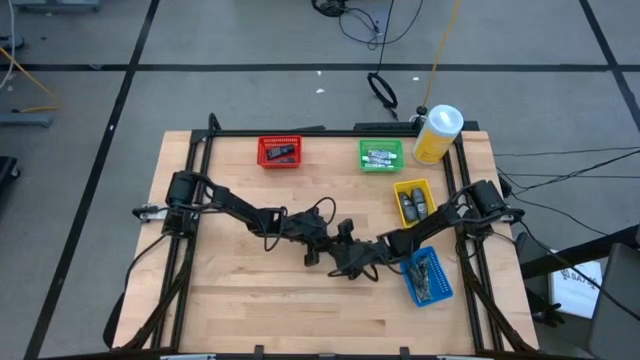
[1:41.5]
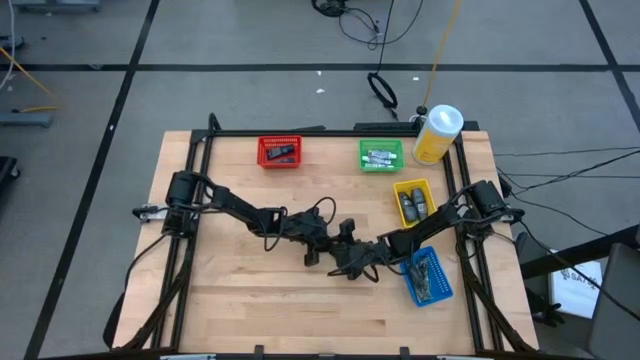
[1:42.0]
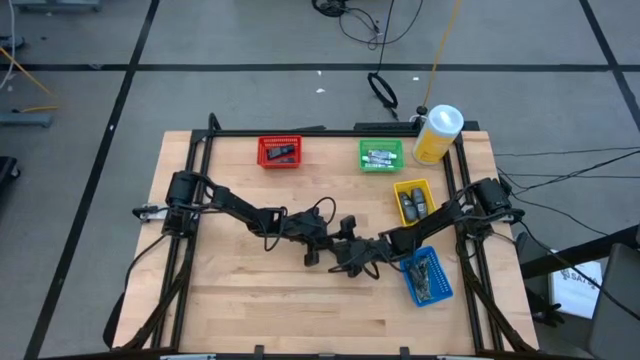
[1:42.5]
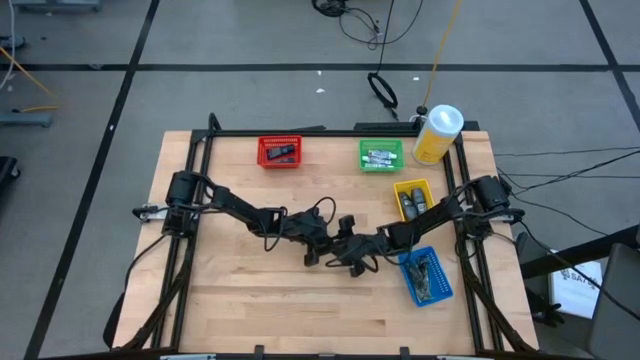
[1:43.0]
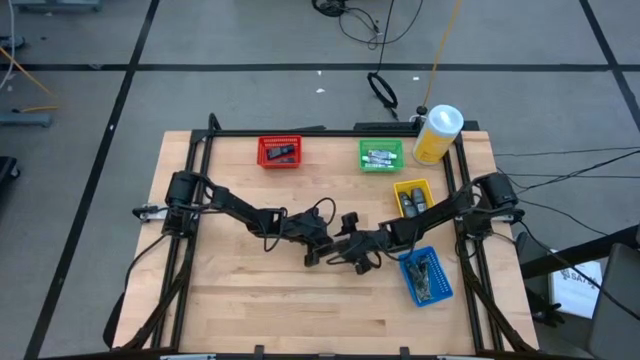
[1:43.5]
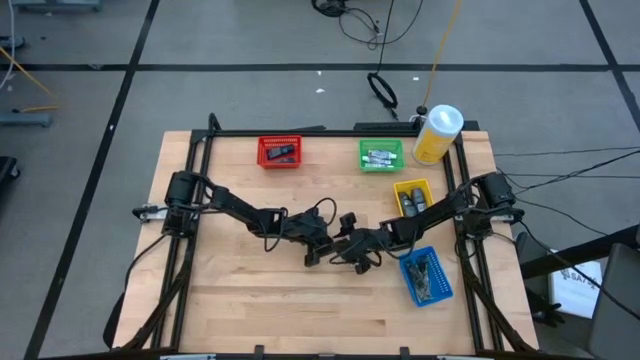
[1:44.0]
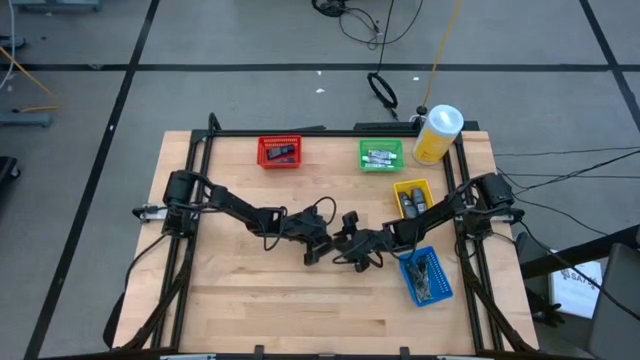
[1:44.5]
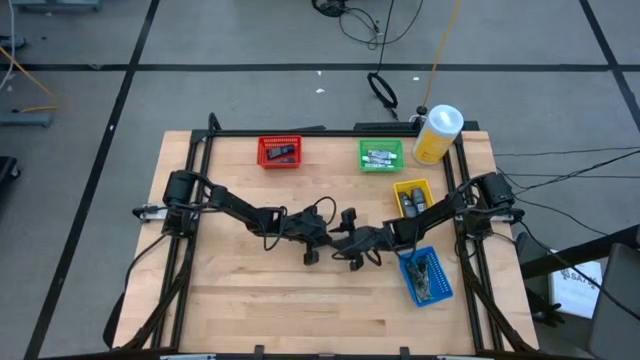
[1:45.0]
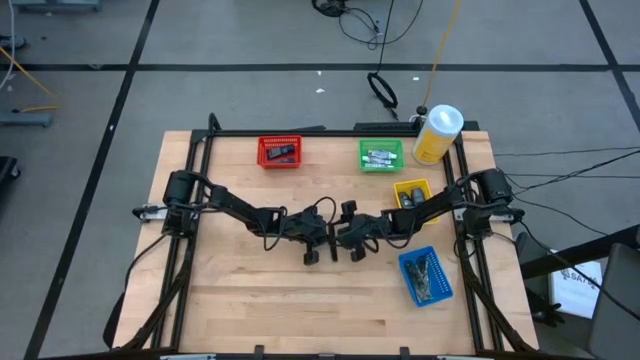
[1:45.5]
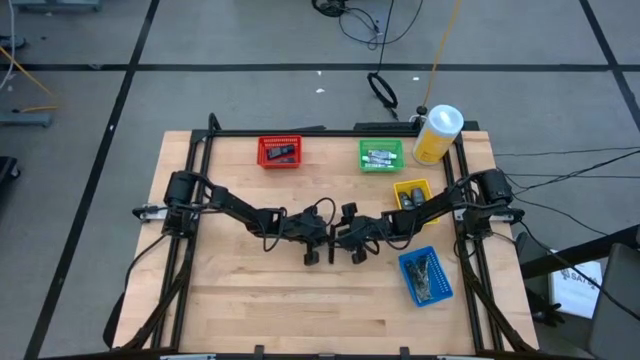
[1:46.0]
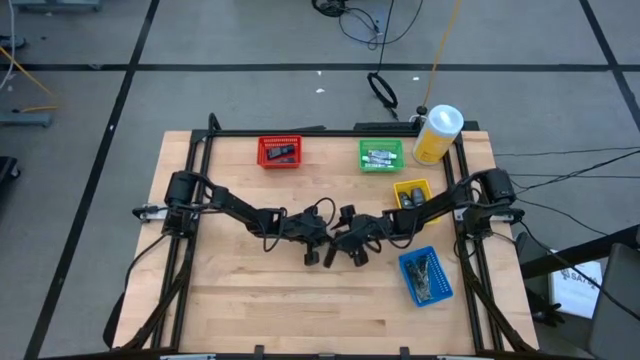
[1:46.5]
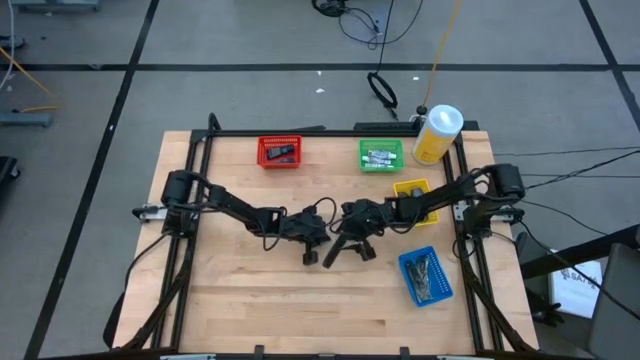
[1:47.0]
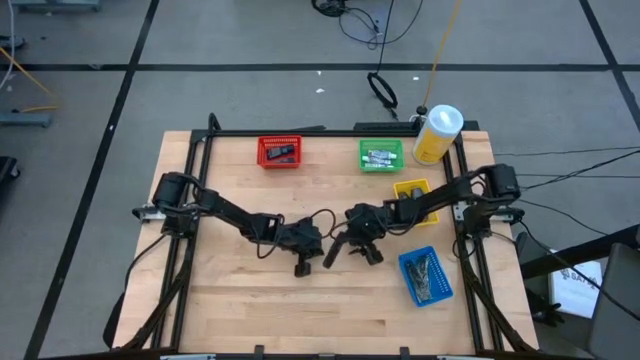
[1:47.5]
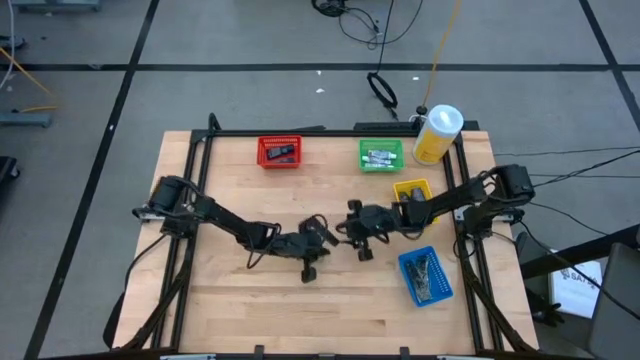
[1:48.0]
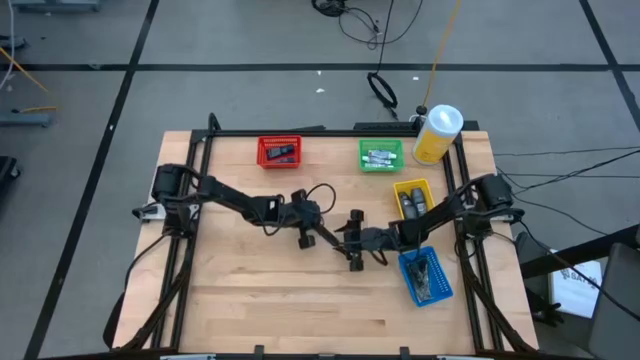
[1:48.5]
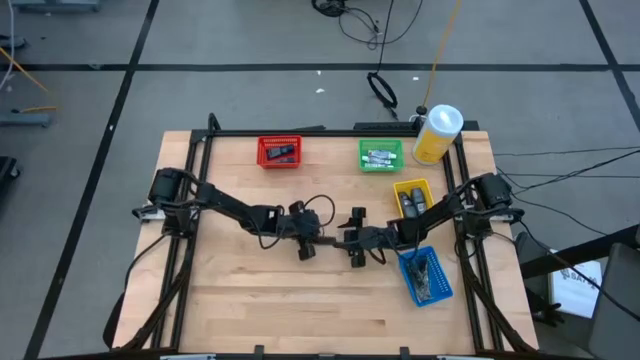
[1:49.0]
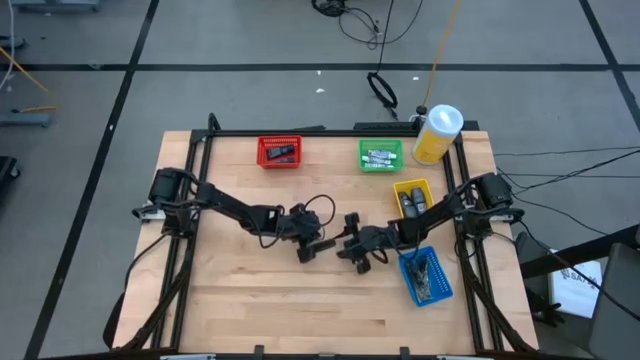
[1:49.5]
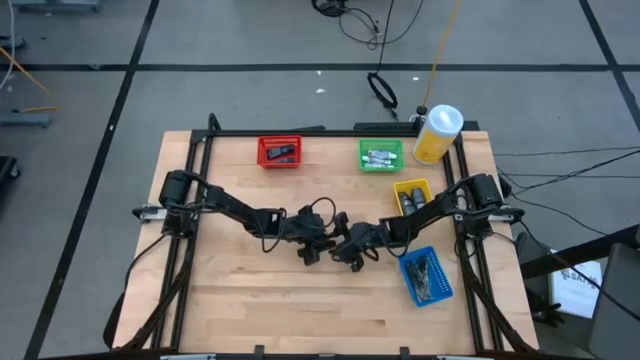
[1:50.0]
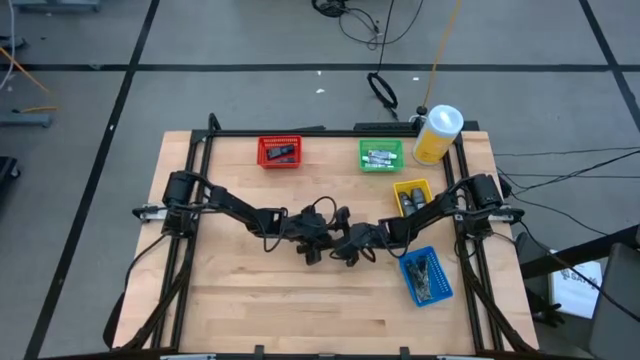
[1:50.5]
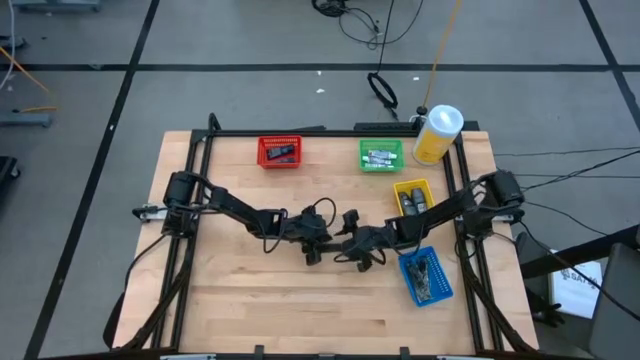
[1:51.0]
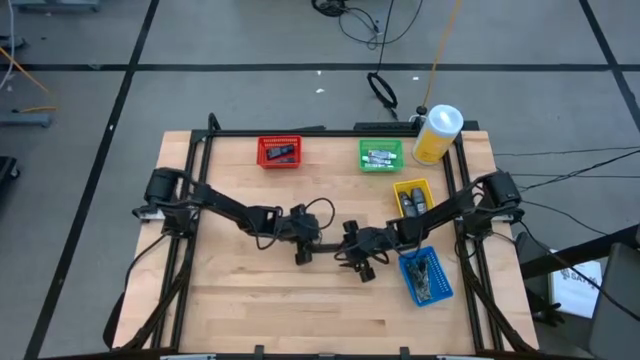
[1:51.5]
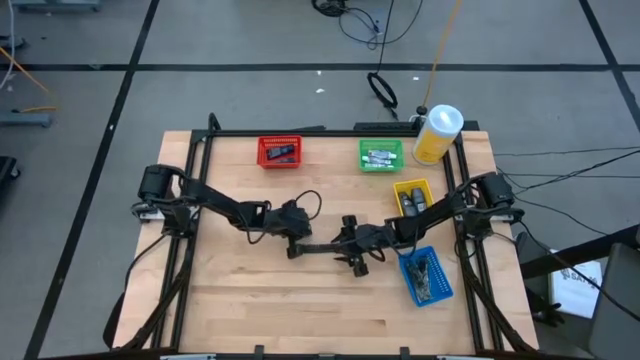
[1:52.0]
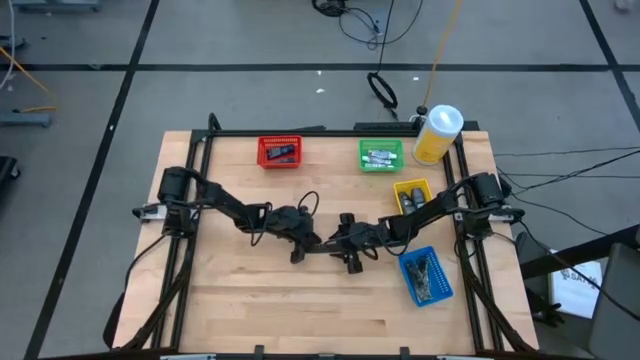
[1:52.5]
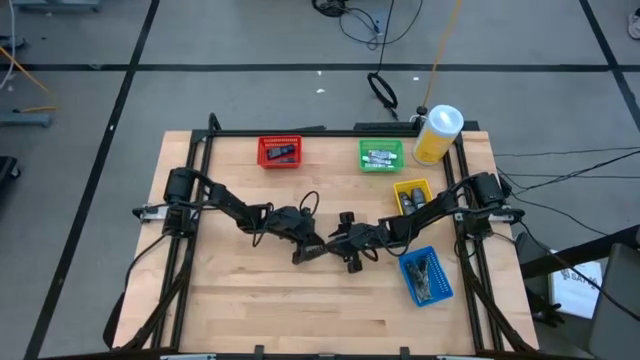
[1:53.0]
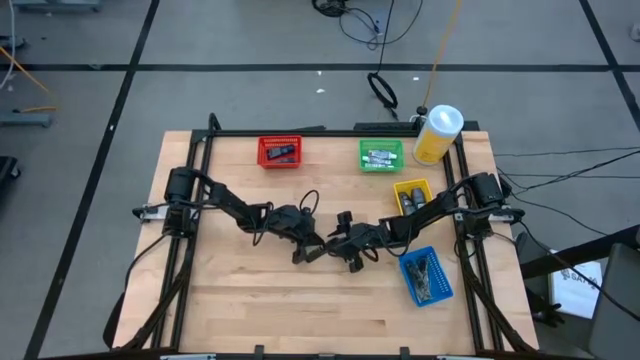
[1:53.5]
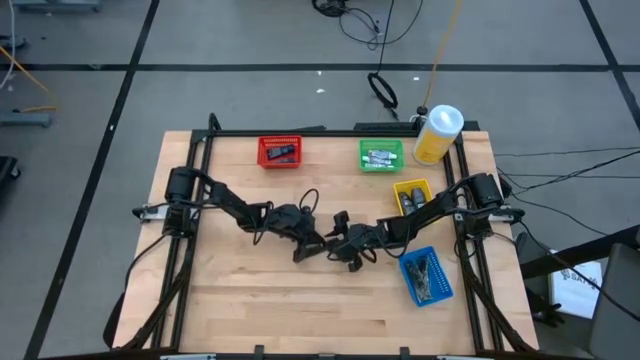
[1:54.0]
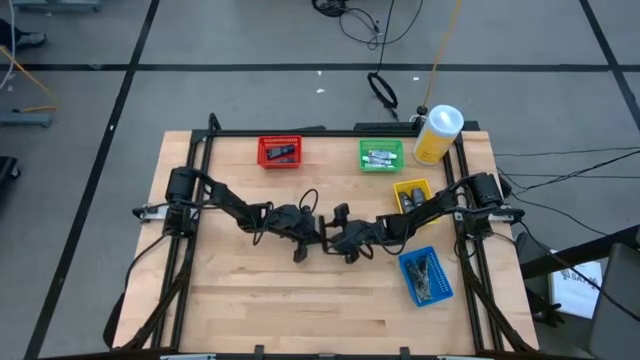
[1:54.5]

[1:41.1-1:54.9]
Task: Pick & Place Travel size toiletries
Put the black comb into the blue bin

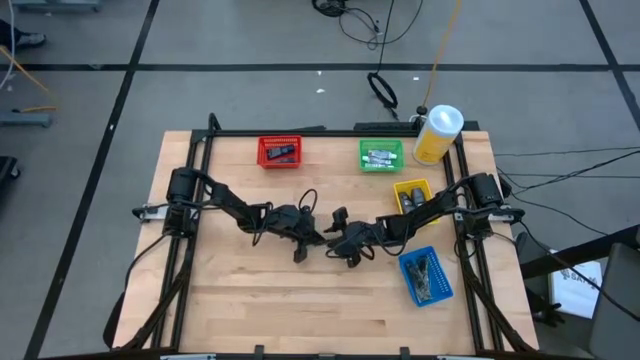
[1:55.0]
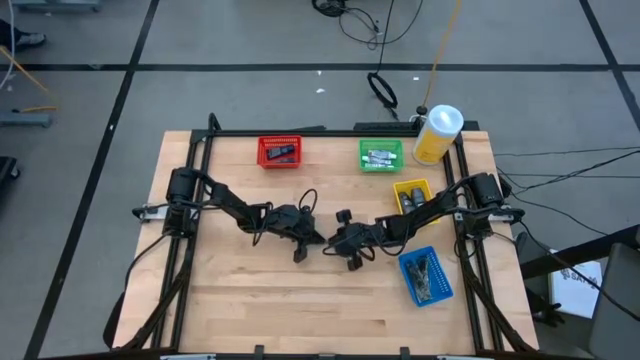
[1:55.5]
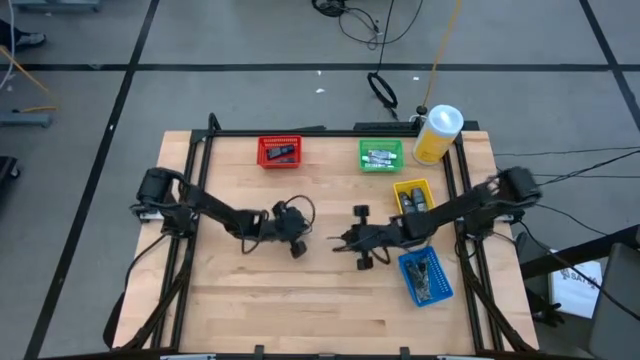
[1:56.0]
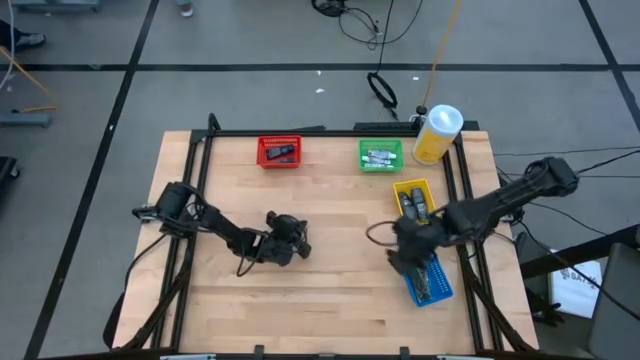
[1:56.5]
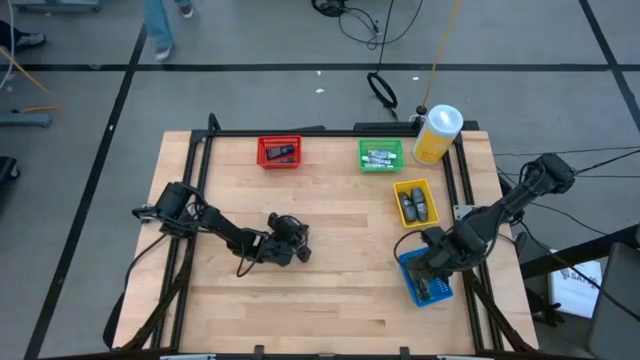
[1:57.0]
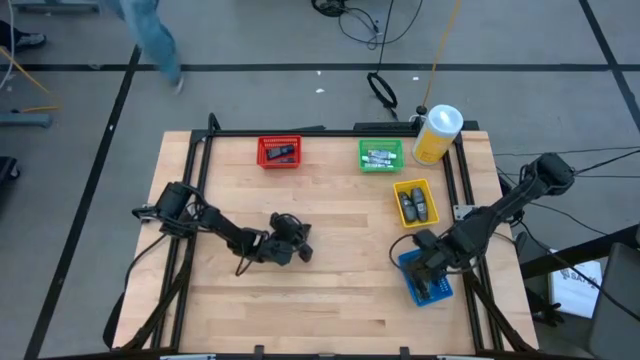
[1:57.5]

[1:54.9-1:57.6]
Put the black comb into the blue bin

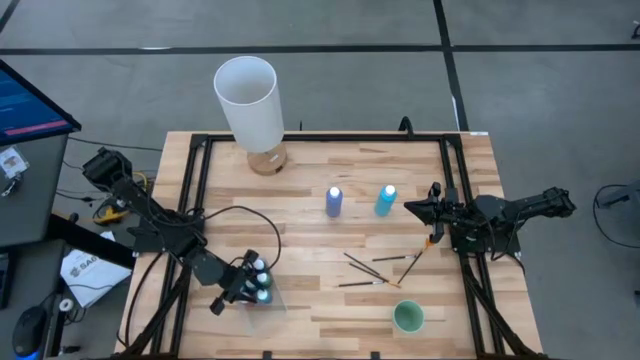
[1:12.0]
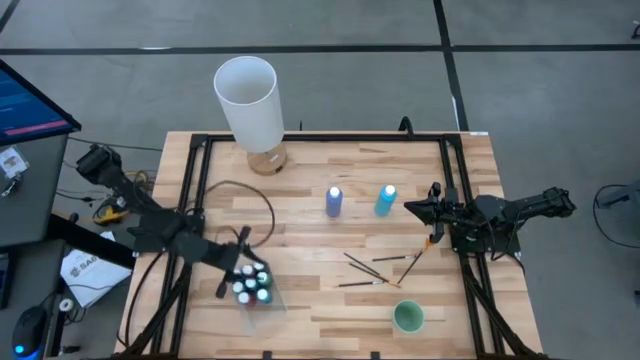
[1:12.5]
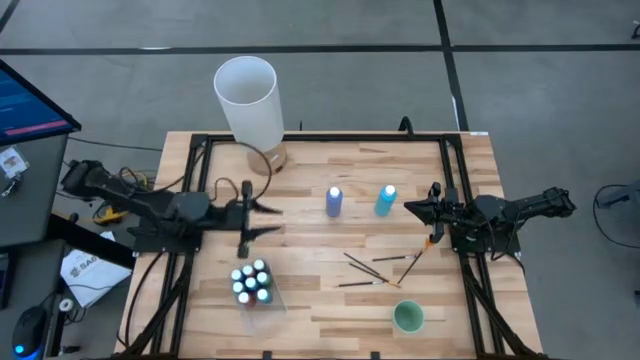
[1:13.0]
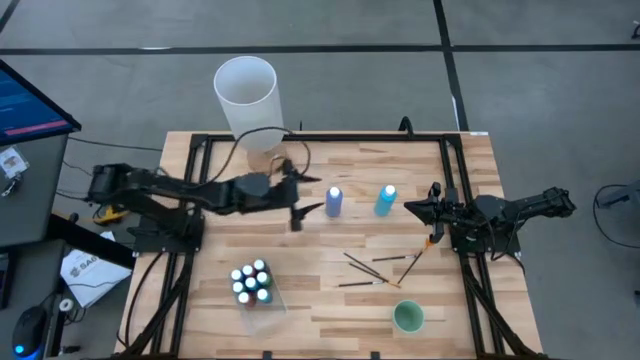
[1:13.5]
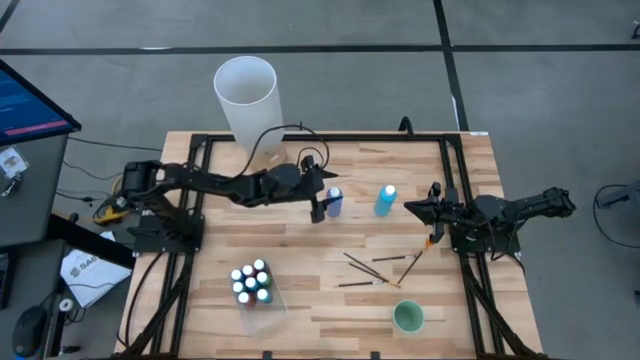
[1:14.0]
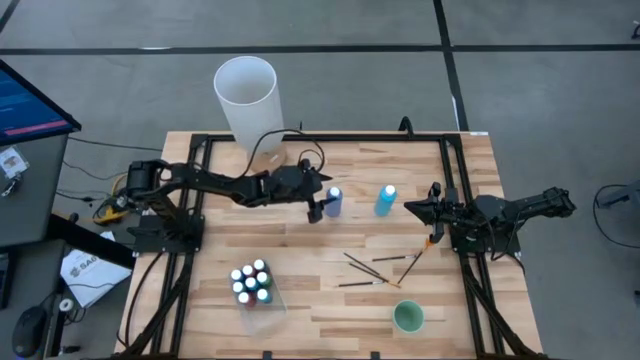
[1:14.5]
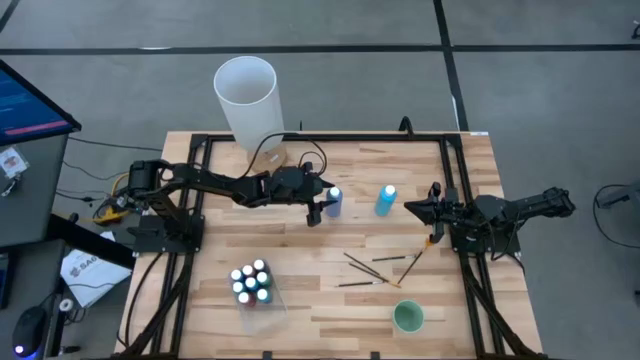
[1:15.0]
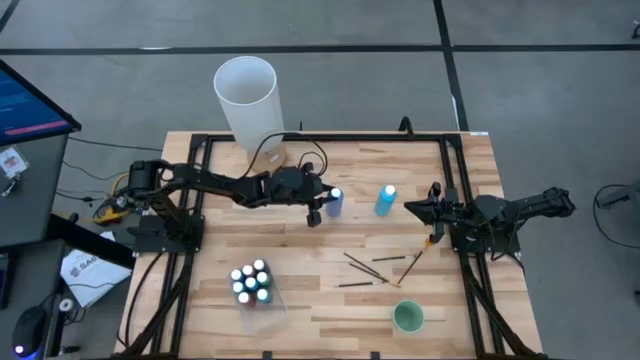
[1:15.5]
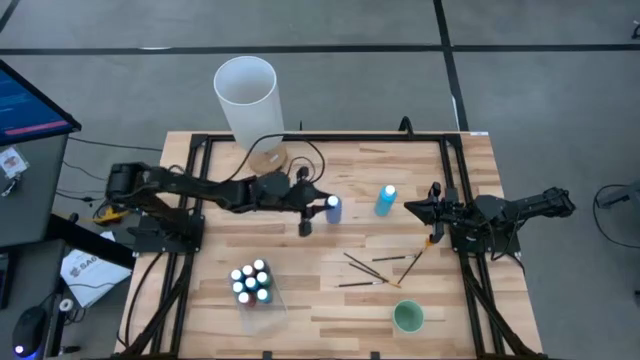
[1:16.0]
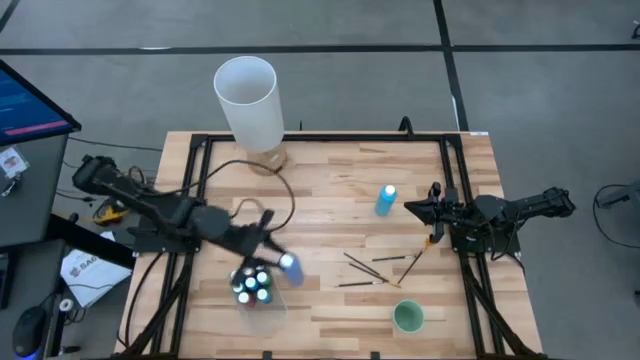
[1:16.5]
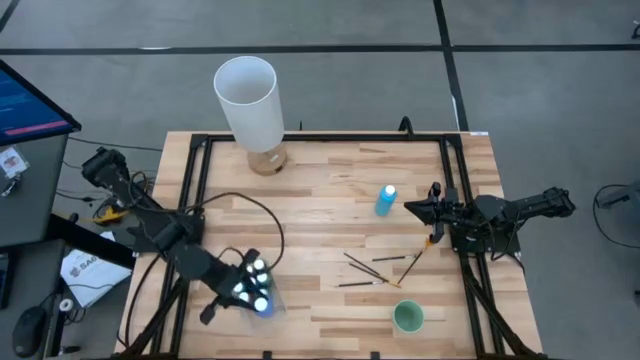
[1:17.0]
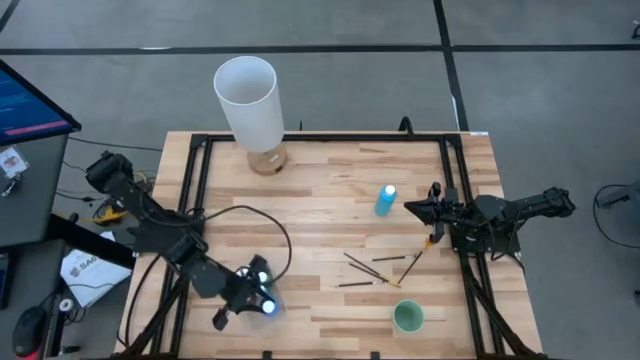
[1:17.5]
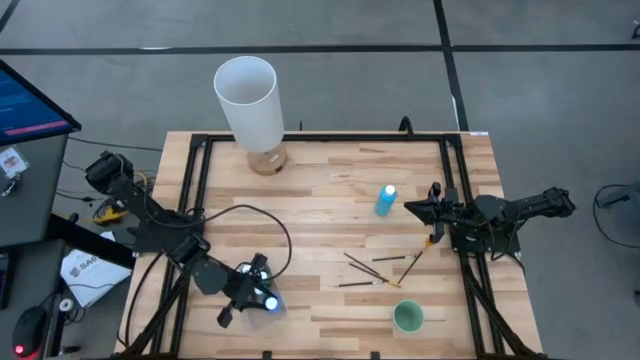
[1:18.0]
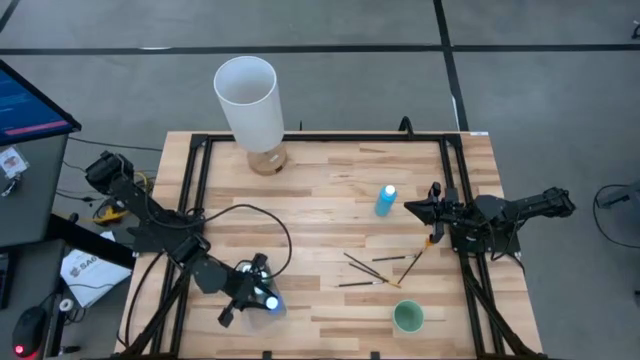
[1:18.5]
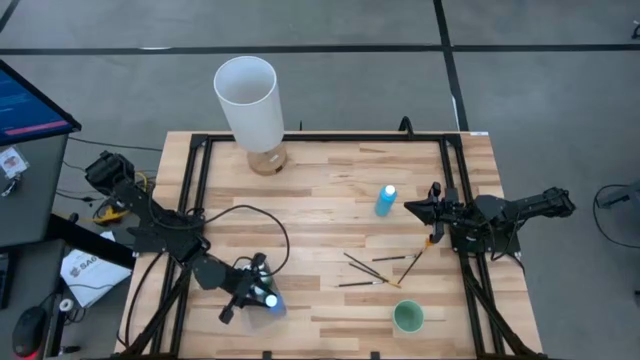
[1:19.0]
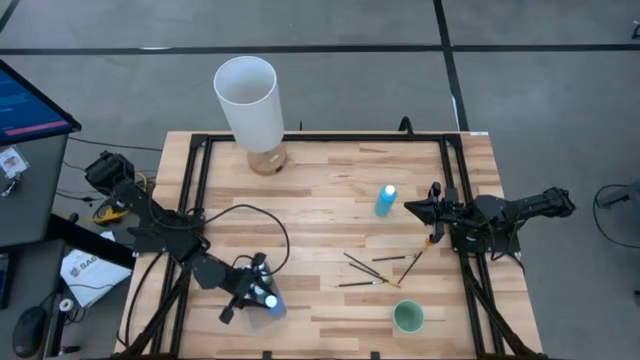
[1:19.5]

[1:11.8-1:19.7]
Task: Pick & Place Paint Supplies
Put the large purple paint bottle into the transparent bin
